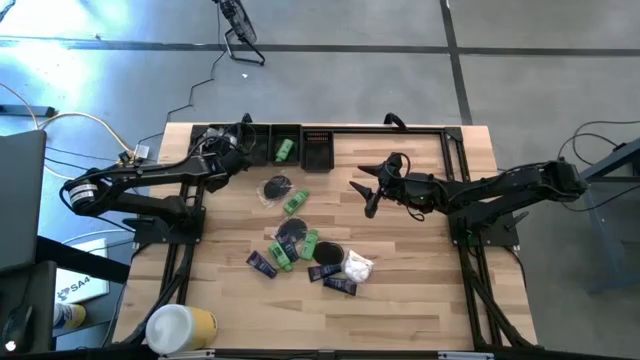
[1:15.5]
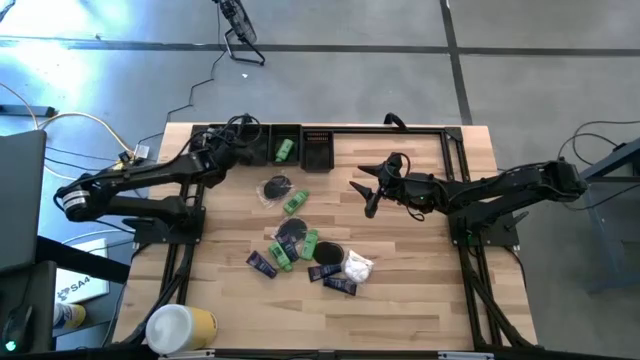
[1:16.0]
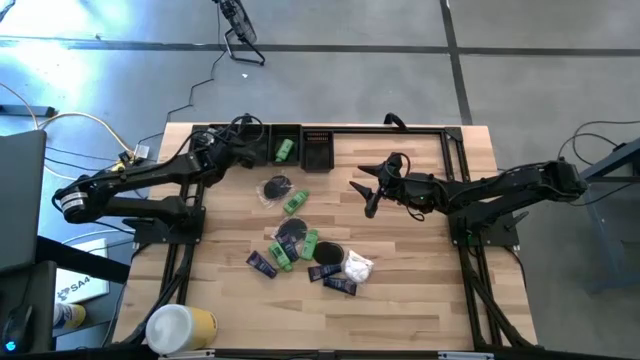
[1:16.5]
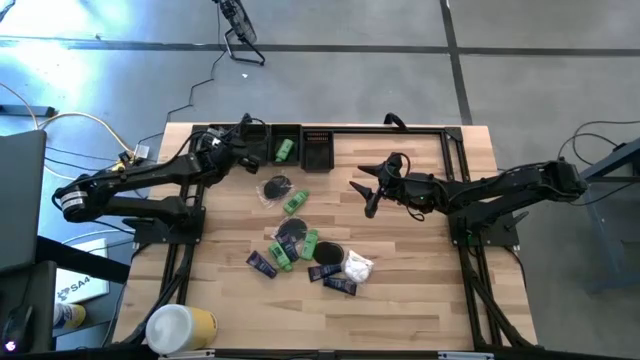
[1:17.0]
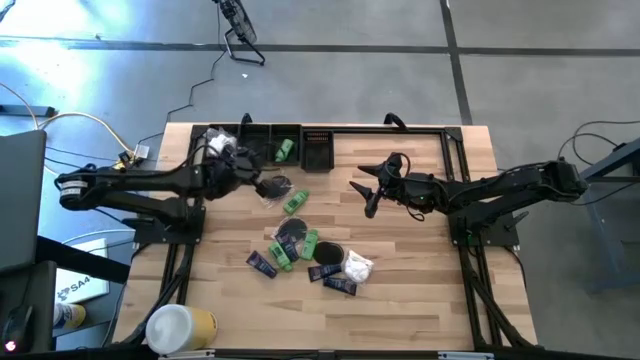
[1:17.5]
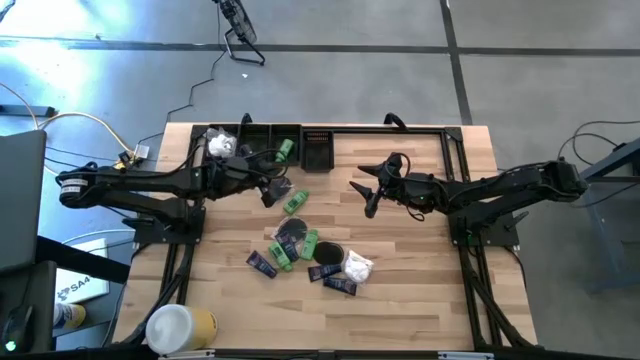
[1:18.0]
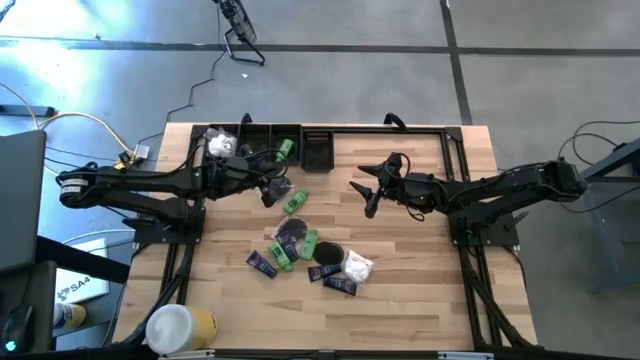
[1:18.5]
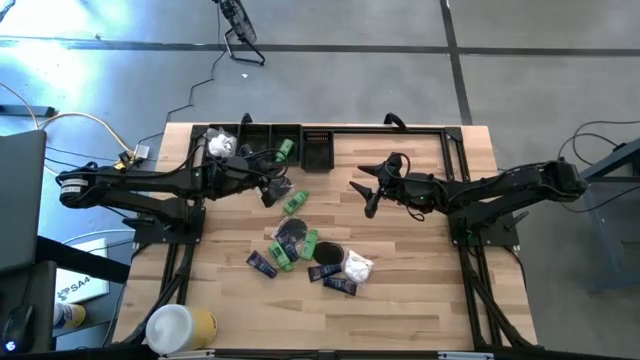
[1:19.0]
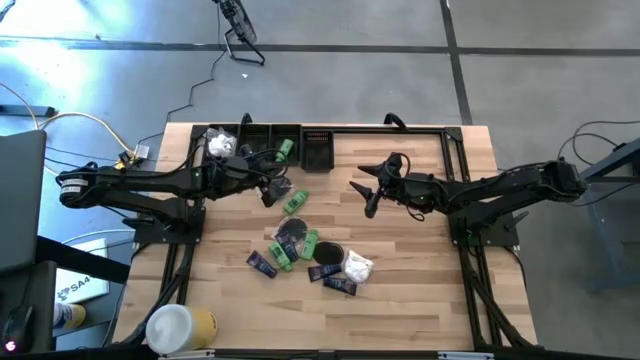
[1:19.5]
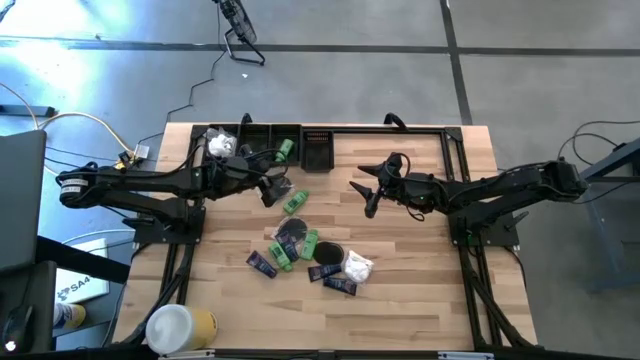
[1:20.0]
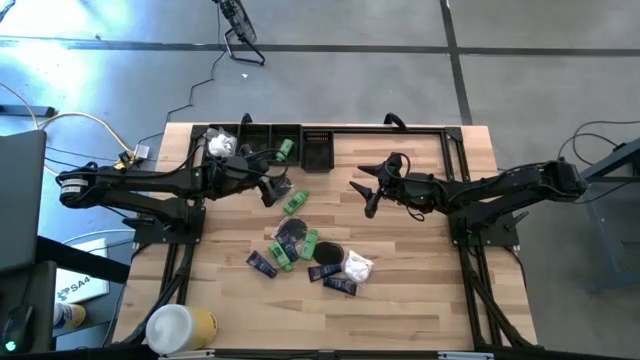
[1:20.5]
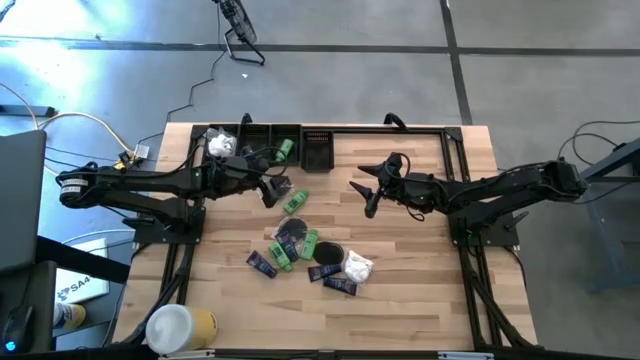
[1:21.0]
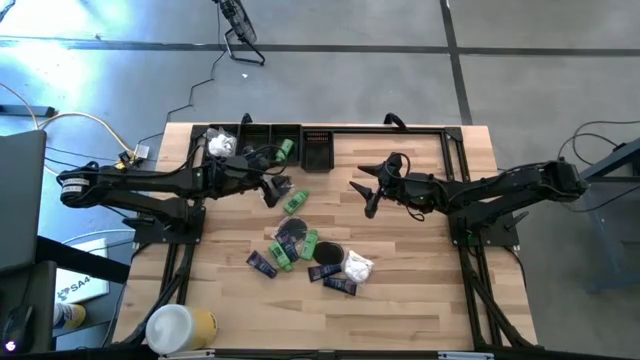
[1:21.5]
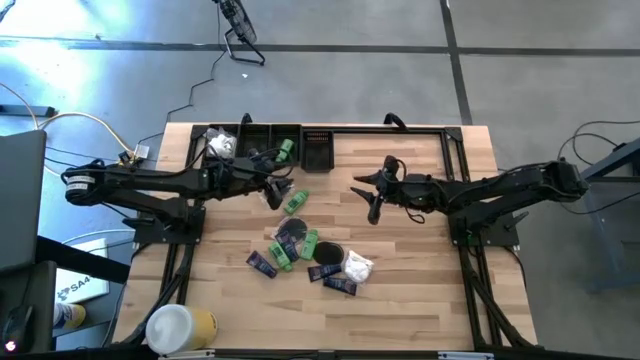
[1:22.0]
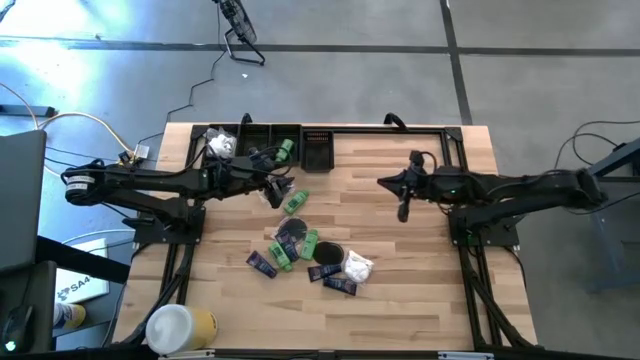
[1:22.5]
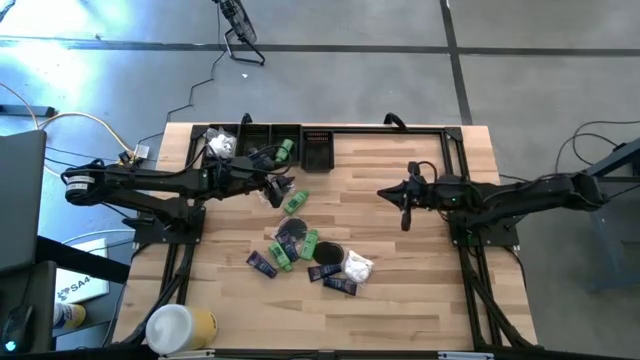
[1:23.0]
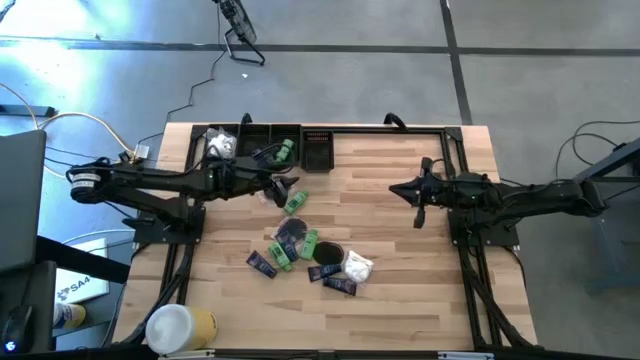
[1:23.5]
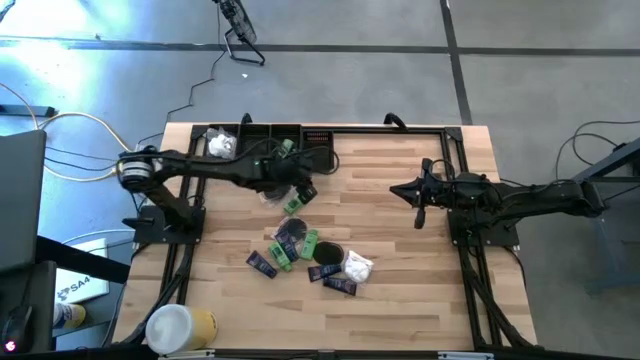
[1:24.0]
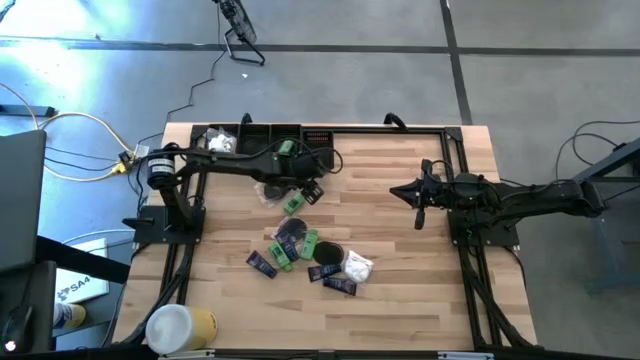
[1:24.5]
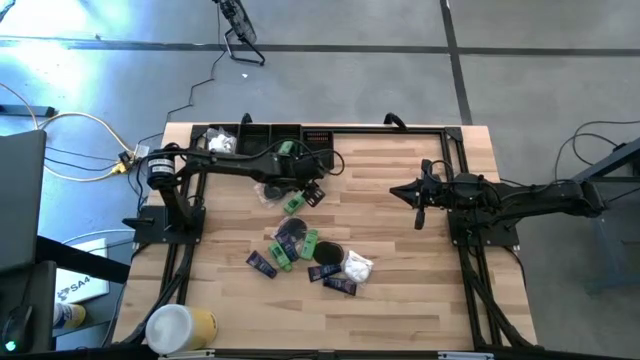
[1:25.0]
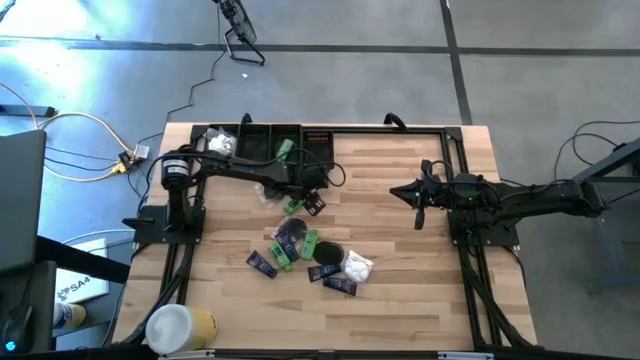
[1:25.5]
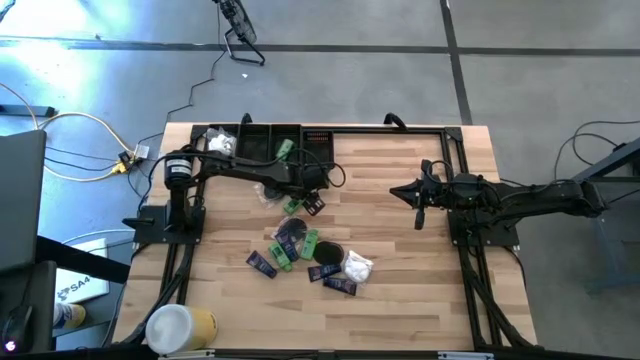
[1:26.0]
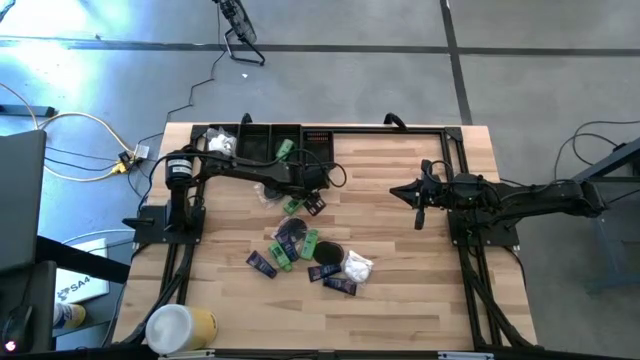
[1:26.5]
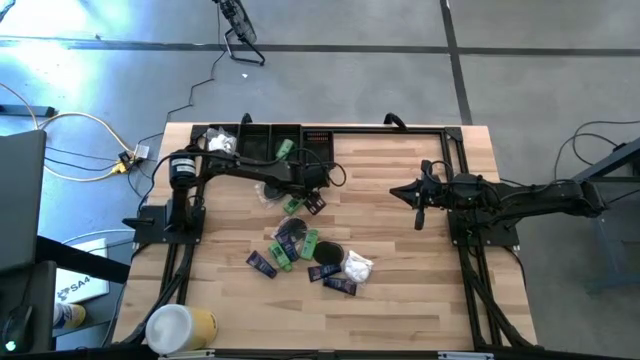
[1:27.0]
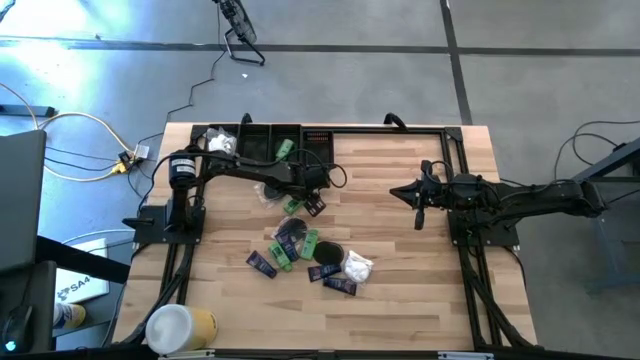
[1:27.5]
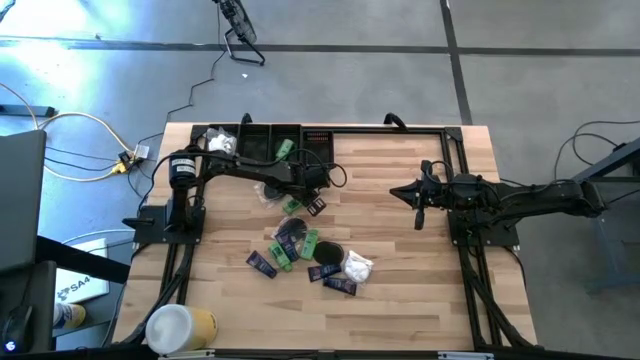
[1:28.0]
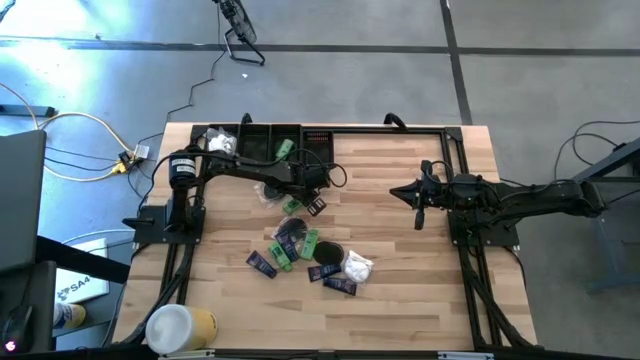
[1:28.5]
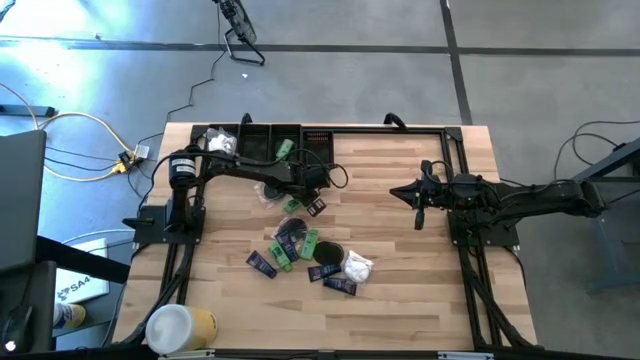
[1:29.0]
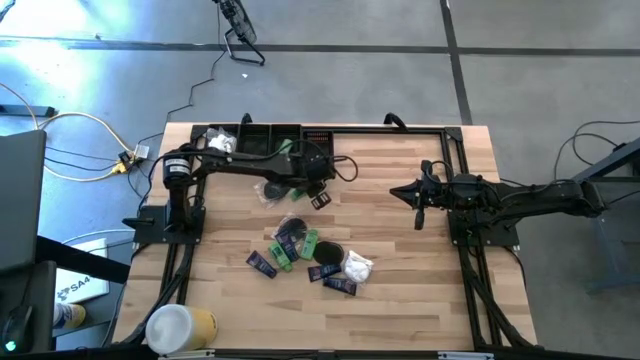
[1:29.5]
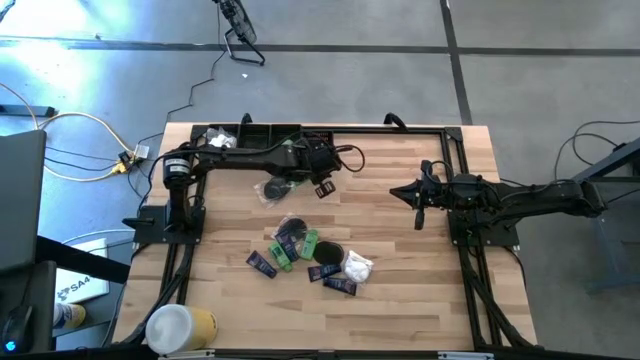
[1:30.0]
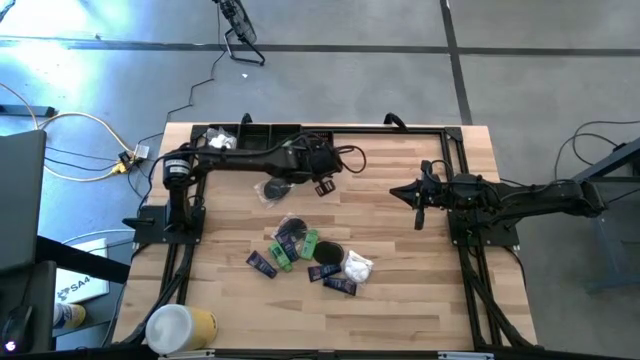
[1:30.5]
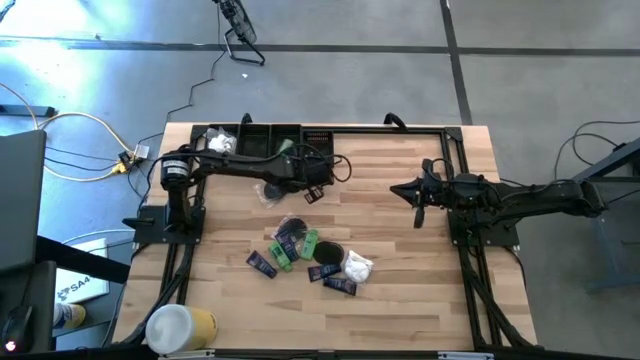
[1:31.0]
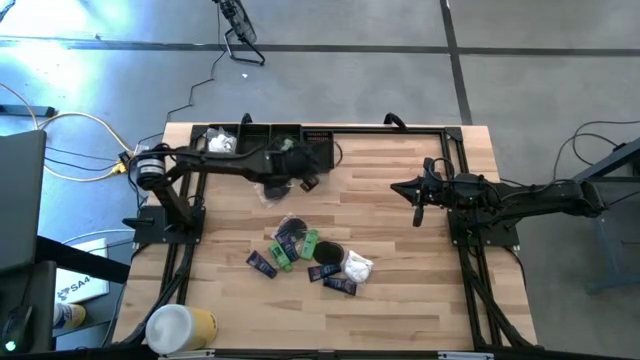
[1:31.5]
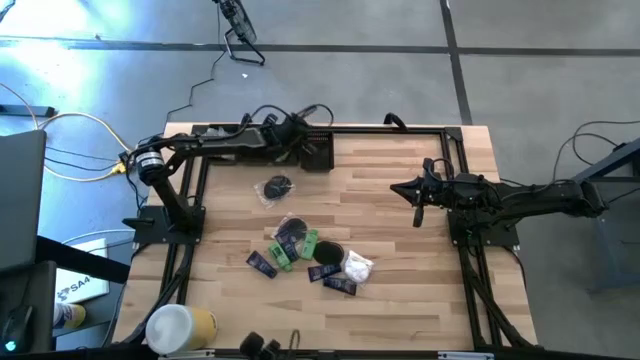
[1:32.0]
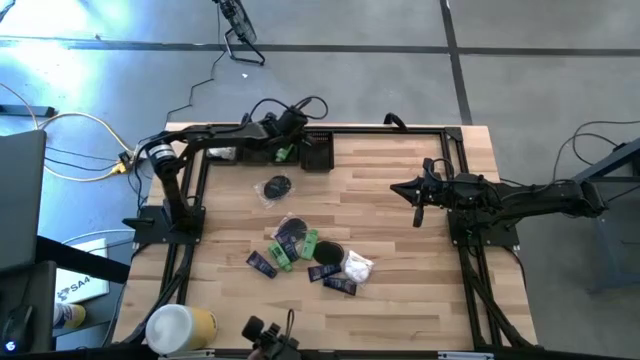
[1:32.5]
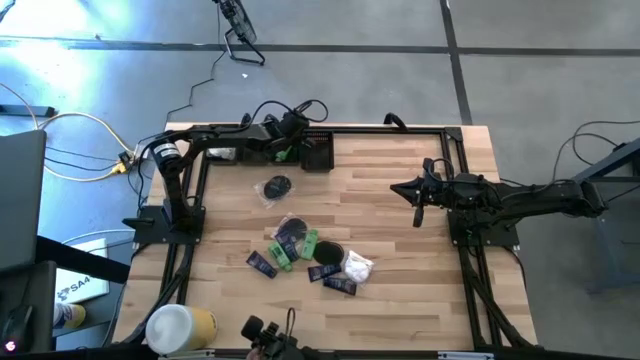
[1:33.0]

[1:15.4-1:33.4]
Task: Pick & Place Travel size toiletries
Put the shampoo into the middle right black bin

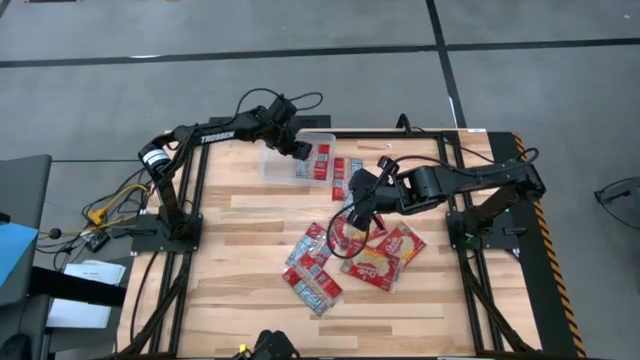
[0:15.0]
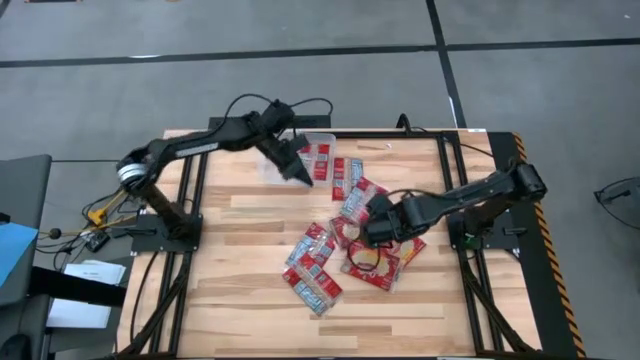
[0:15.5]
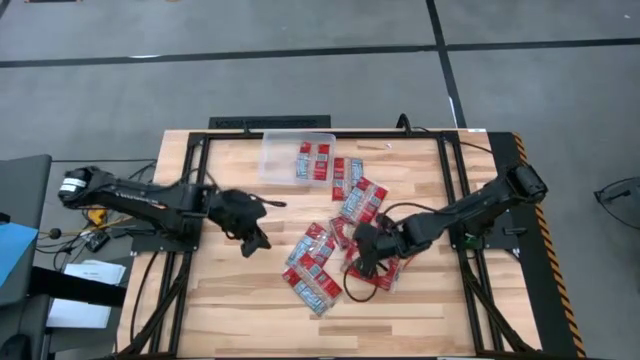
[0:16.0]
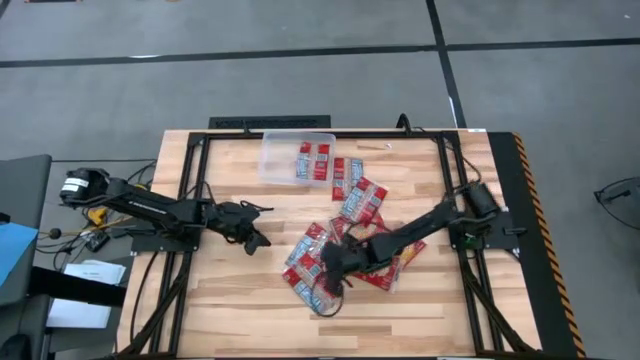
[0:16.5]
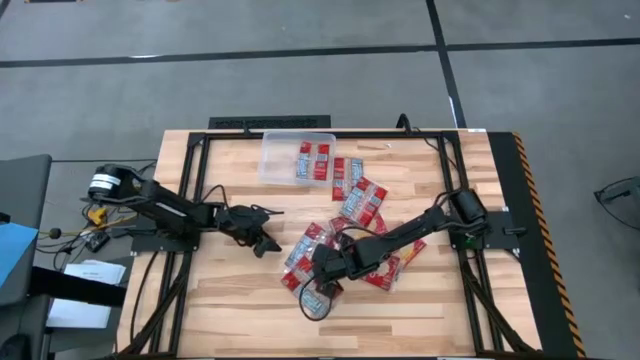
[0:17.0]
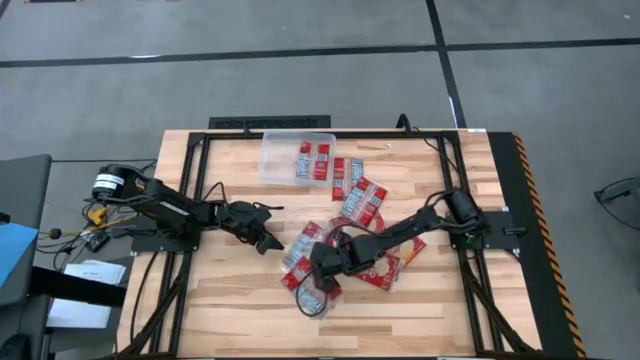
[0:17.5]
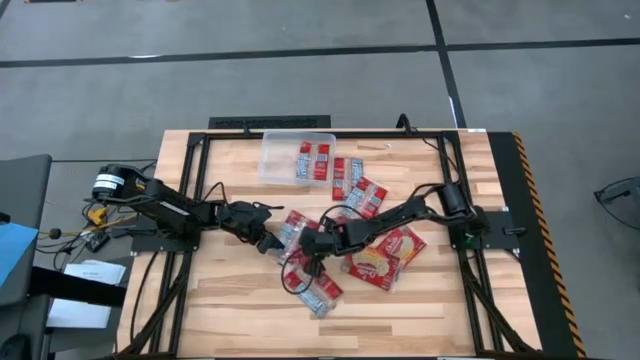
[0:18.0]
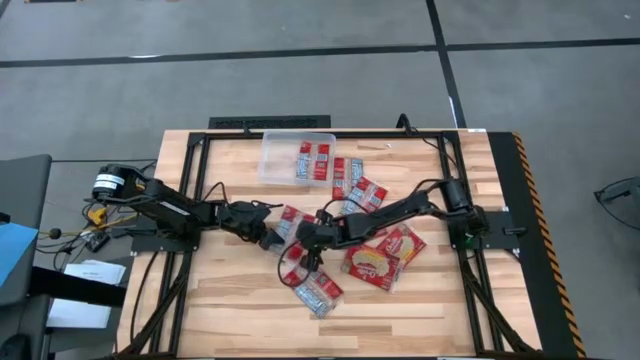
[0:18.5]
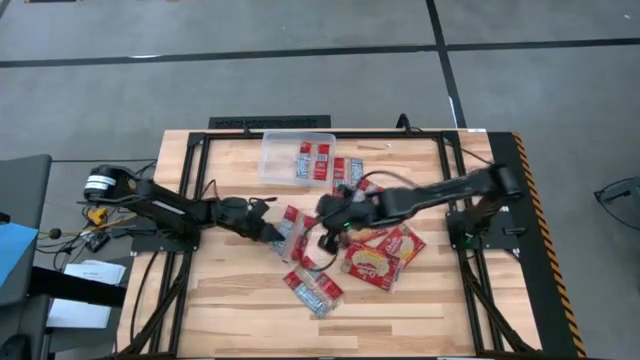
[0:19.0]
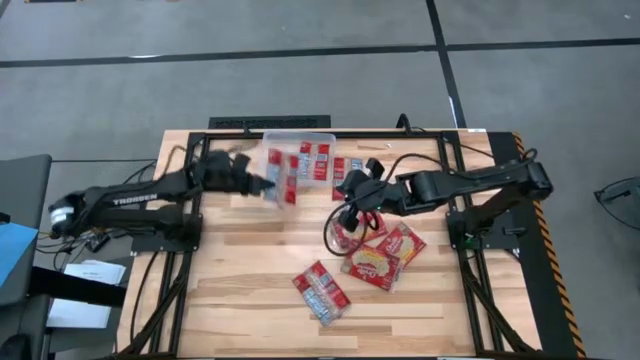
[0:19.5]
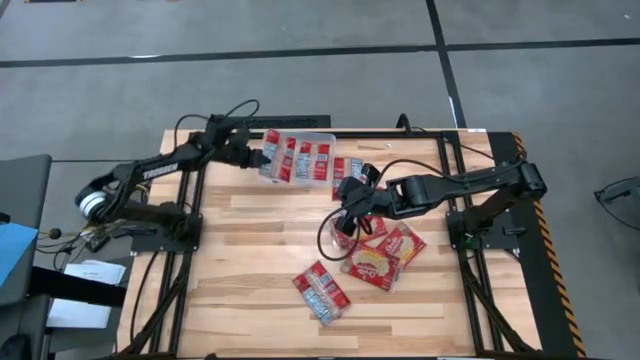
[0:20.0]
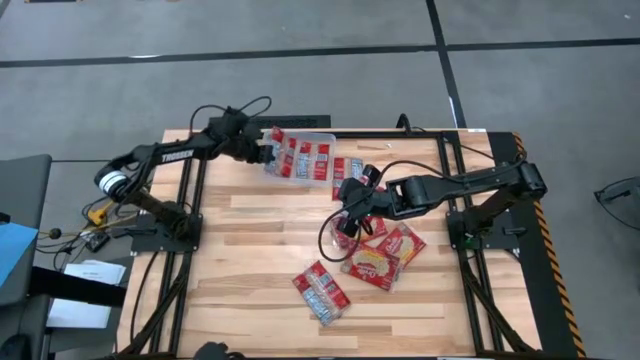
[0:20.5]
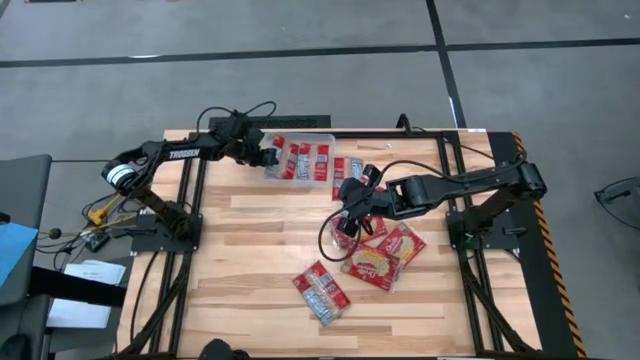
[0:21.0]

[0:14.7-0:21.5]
Task: Sort popcorn bags into baskets
Put the red popcorn bag into the transparent bin
